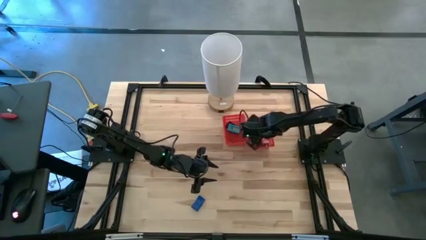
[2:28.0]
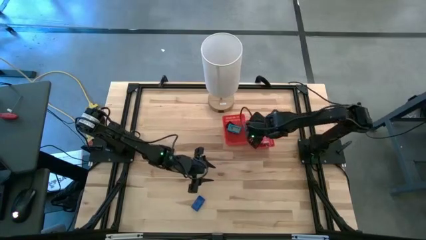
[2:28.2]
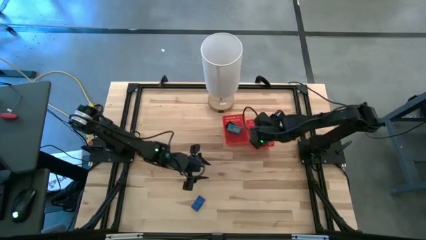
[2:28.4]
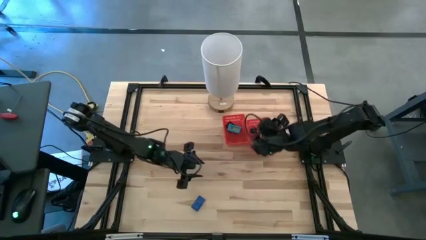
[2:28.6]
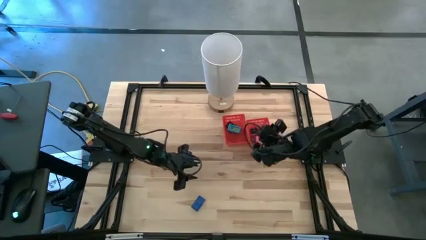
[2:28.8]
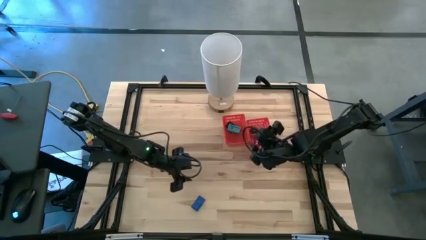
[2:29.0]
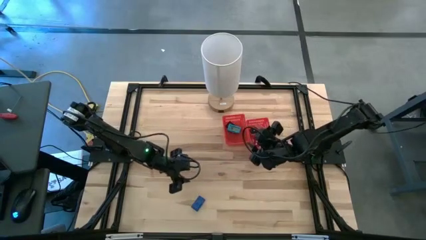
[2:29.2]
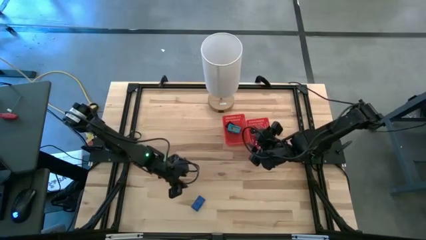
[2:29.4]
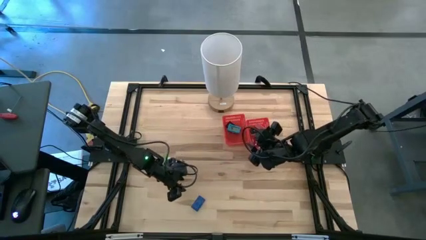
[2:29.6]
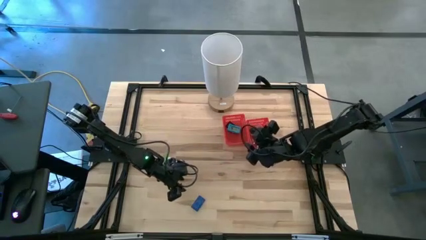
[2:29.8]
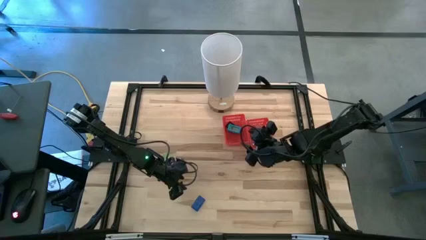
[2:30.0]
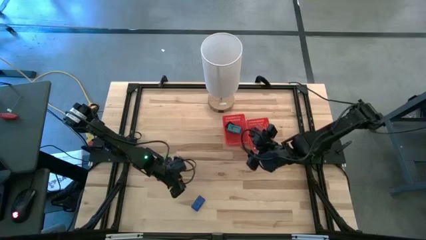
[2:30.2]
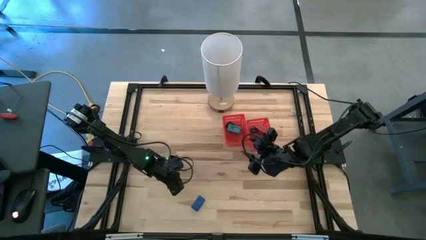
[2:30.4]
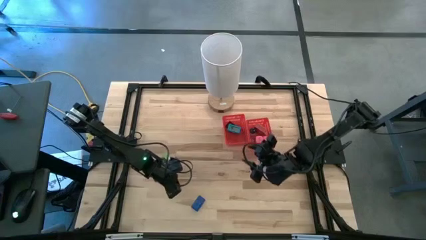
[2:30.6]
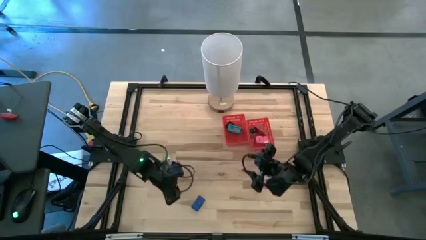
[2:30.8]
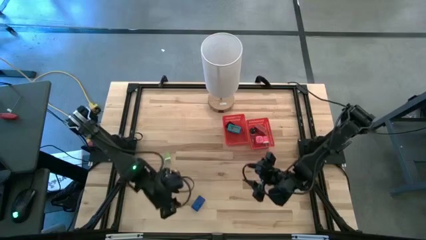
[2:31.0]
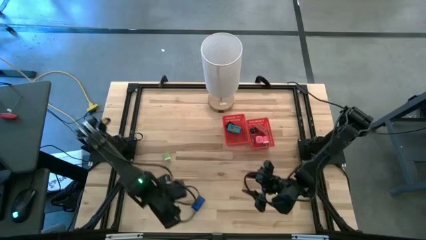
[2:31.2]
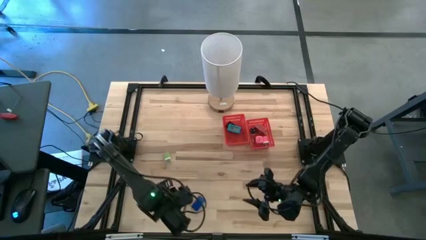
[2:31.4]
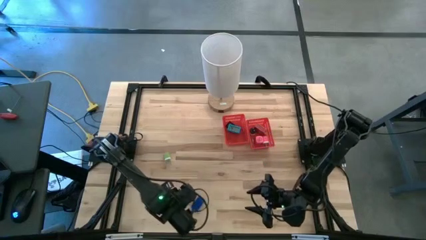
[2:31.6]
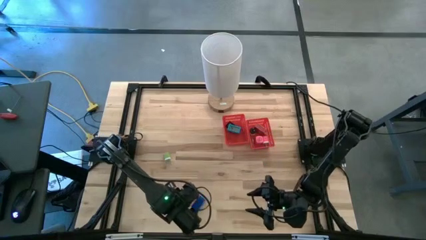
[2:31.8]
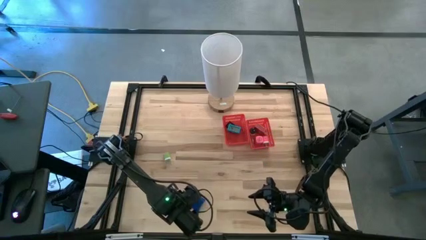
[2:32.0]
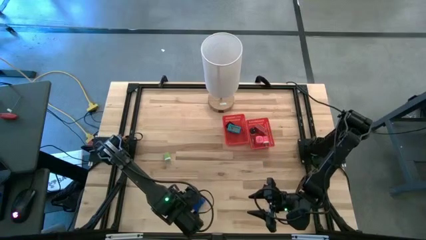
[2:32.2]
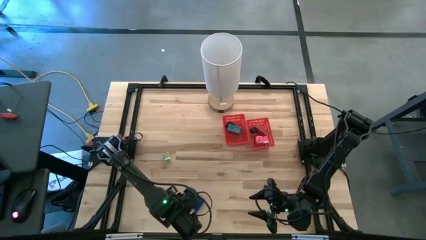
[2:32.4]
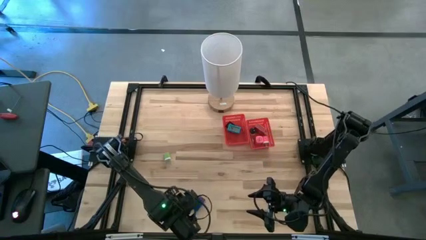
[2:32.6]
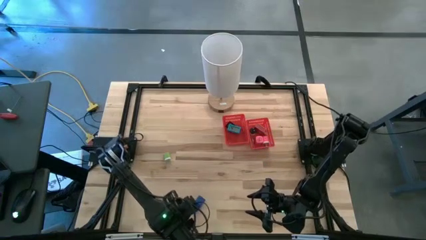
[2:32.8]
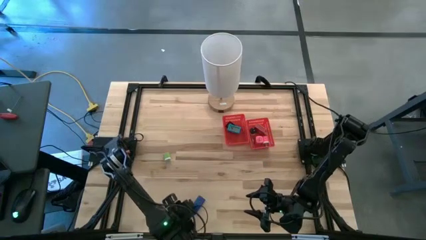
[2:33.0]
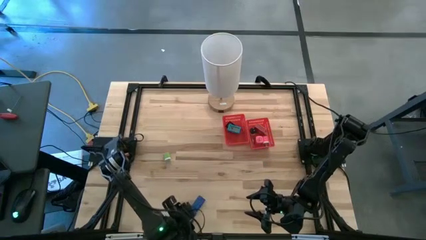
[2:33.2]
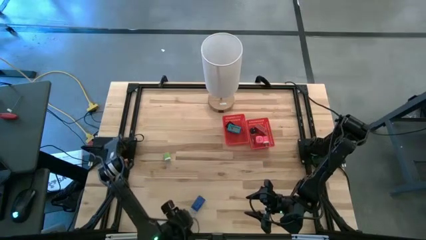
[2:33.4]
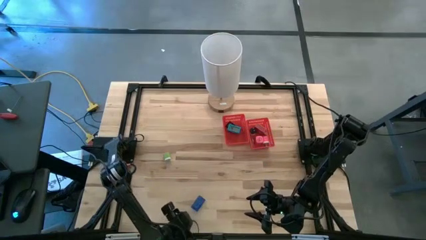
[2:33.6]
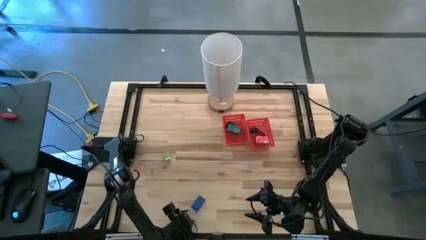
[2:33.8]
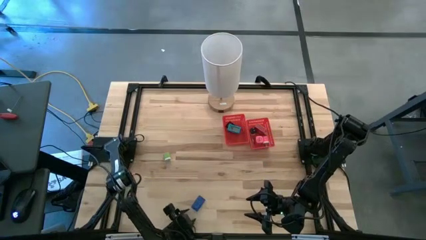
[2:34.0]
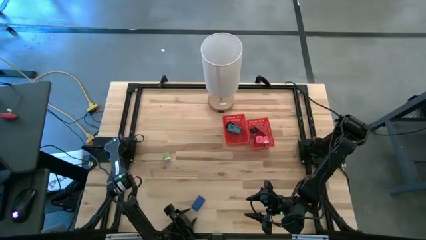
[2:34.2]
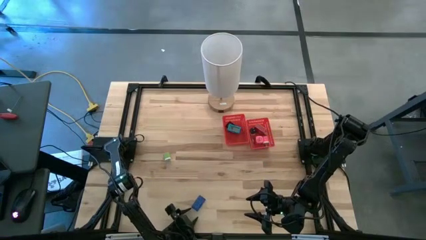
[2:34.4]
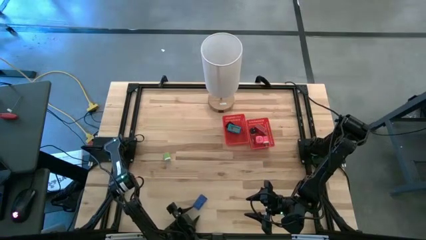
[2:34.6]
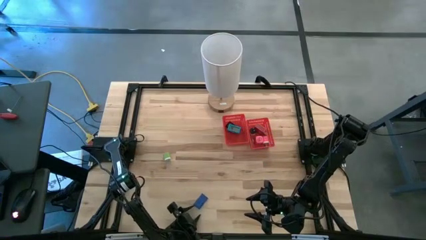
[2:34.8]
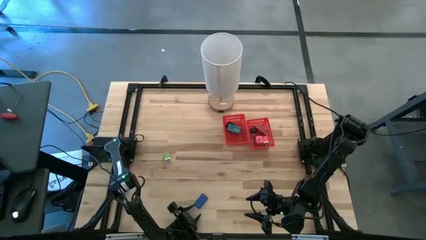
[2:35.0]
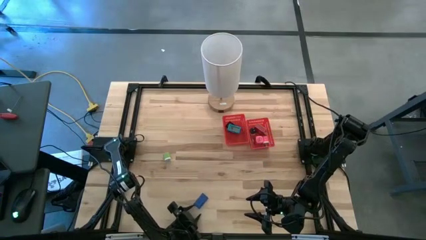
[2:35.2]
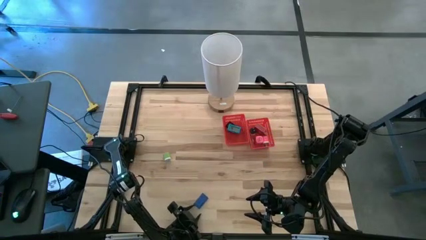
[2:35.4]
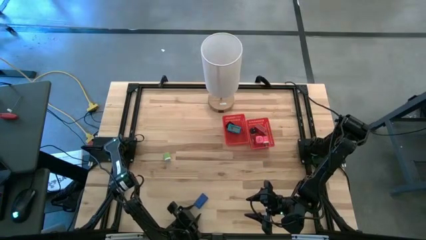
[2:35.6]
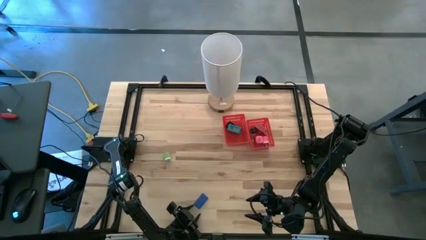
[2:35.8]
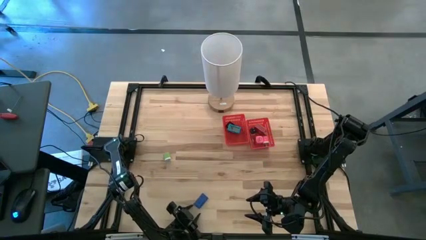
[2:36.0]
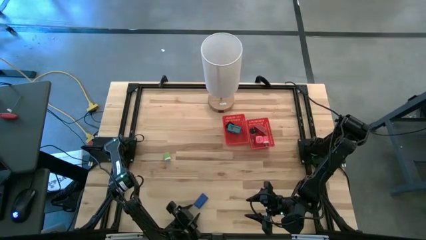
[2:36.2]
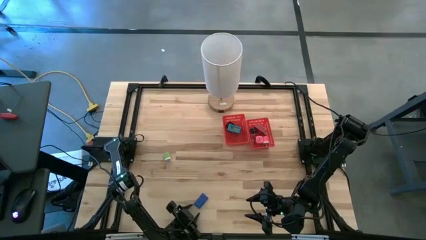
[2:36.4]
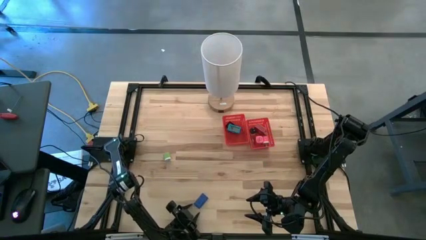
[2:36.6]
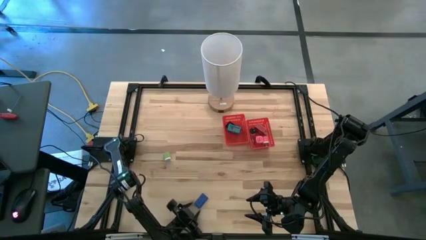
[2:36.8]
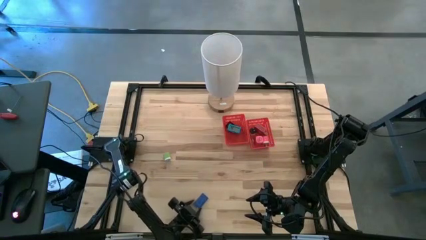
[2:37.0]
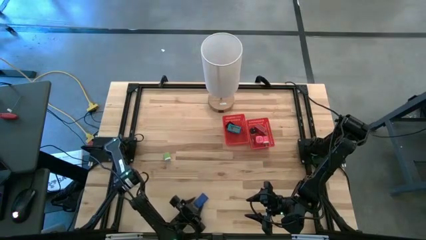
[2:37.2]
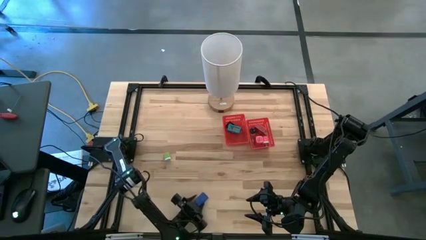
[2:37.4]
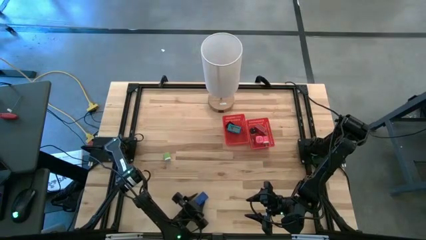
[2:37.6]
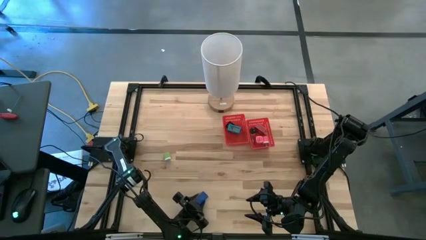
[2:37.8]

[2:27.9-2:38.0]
Task: Pick & Place Office items
Put the blue timer into the left red bin

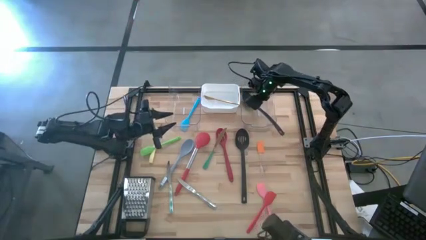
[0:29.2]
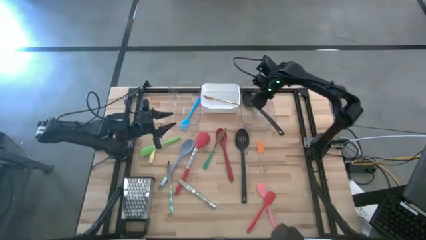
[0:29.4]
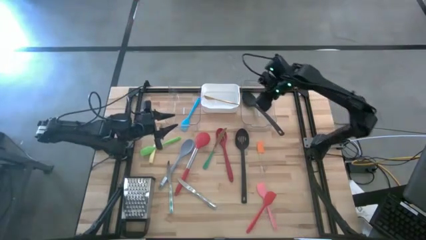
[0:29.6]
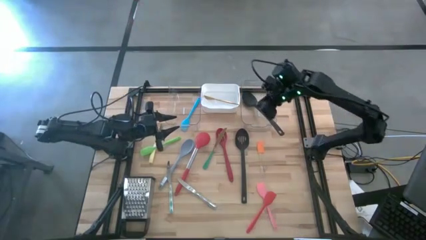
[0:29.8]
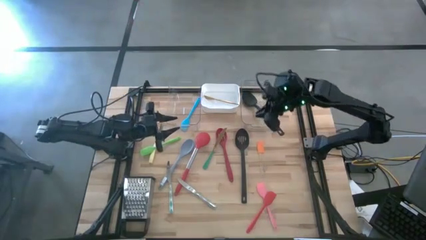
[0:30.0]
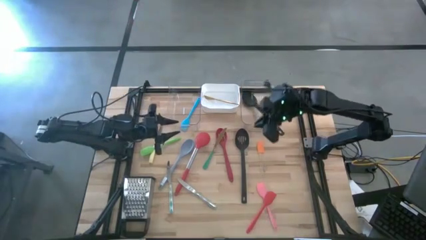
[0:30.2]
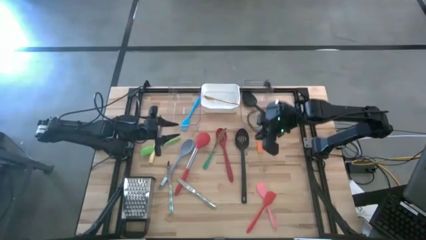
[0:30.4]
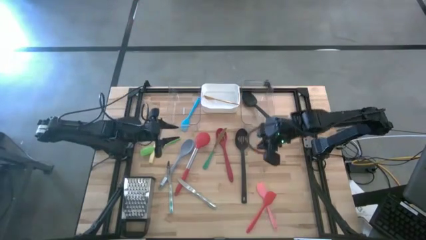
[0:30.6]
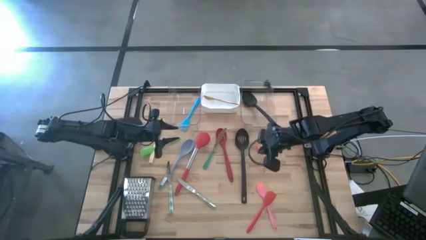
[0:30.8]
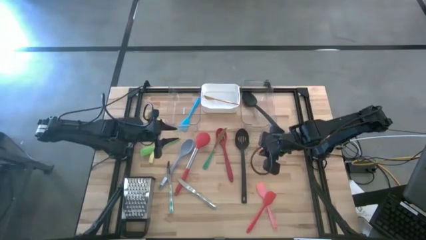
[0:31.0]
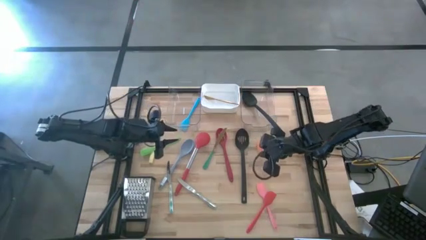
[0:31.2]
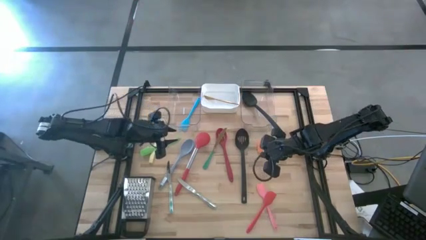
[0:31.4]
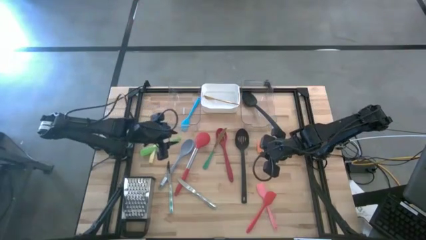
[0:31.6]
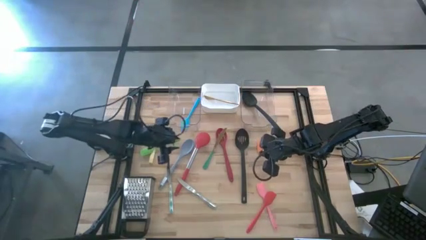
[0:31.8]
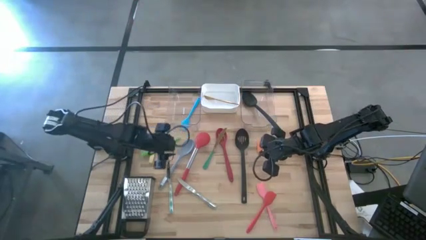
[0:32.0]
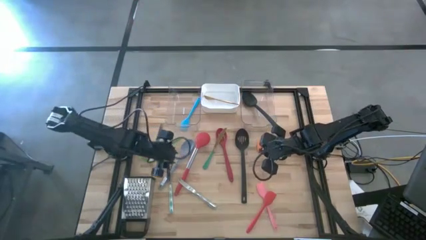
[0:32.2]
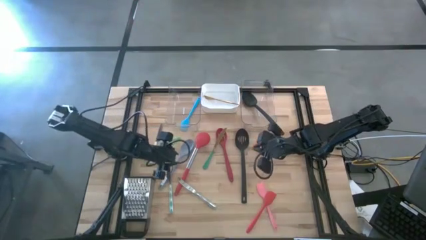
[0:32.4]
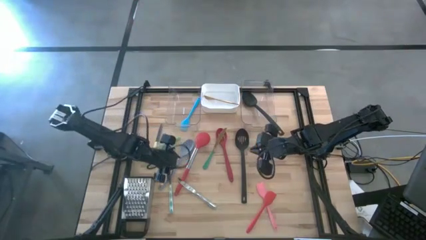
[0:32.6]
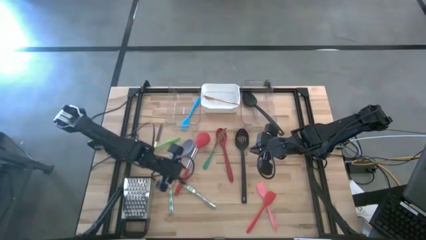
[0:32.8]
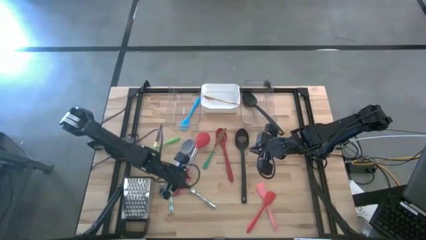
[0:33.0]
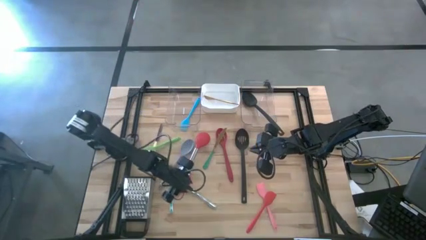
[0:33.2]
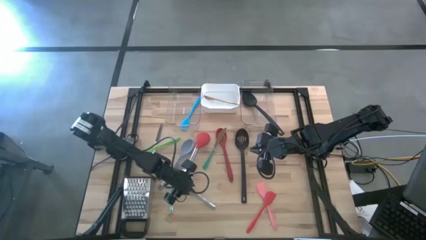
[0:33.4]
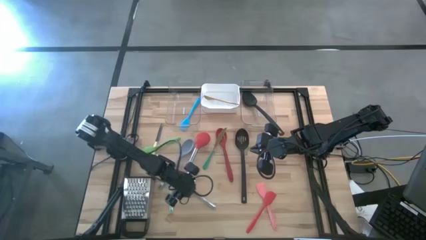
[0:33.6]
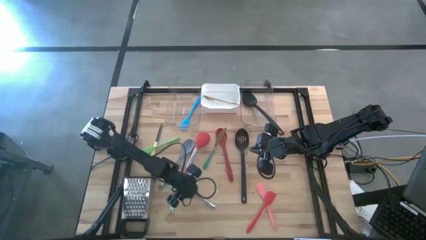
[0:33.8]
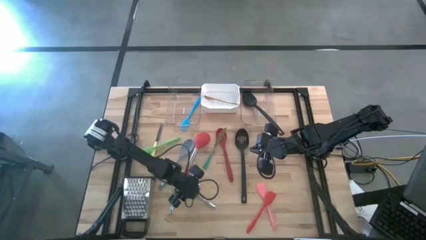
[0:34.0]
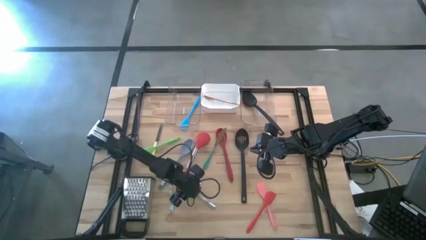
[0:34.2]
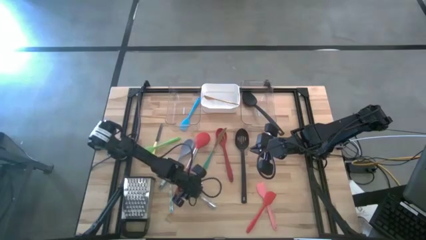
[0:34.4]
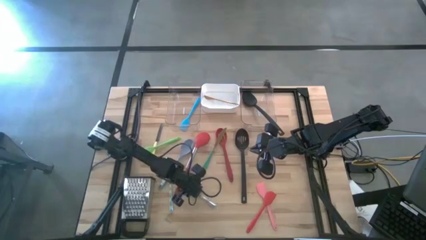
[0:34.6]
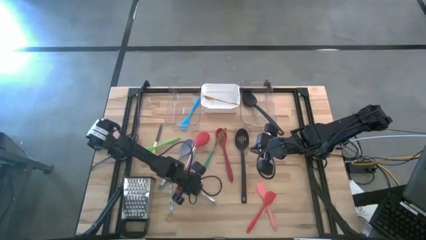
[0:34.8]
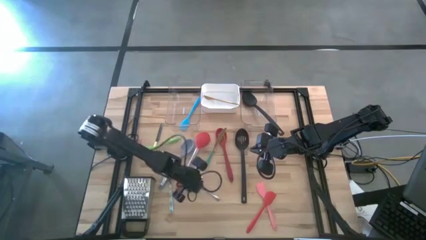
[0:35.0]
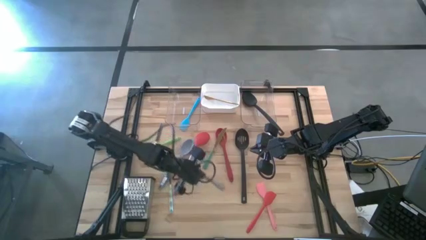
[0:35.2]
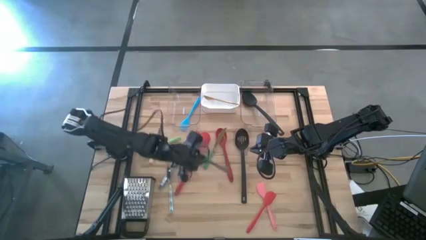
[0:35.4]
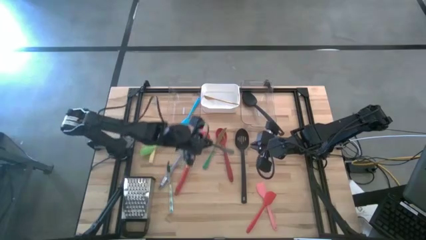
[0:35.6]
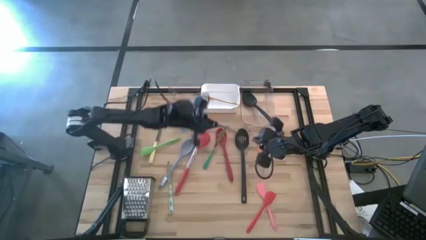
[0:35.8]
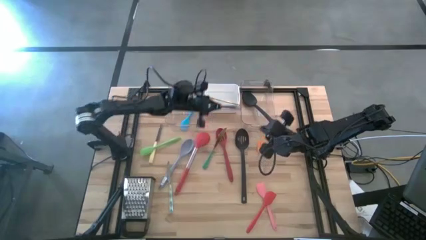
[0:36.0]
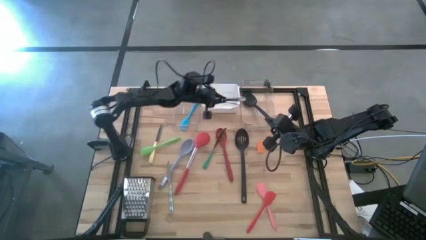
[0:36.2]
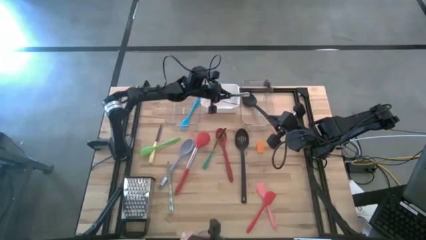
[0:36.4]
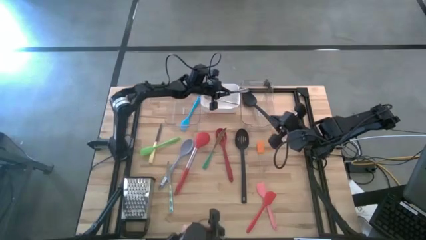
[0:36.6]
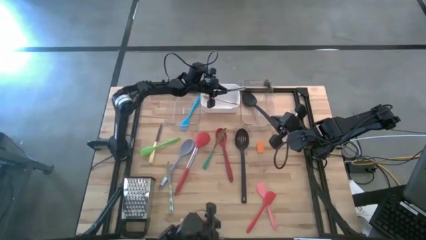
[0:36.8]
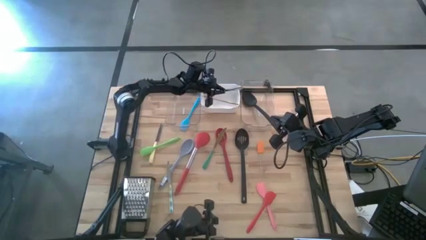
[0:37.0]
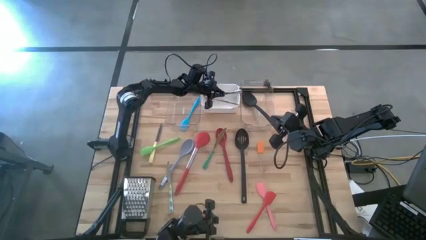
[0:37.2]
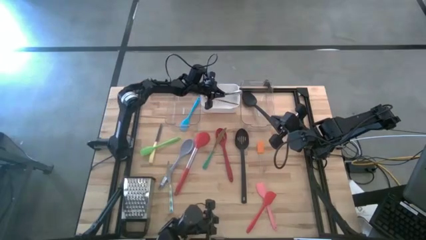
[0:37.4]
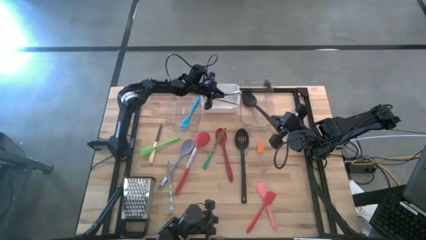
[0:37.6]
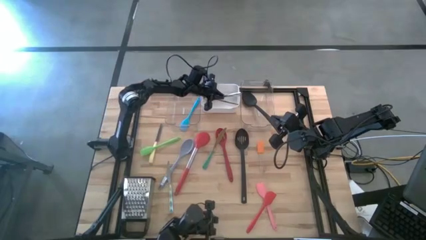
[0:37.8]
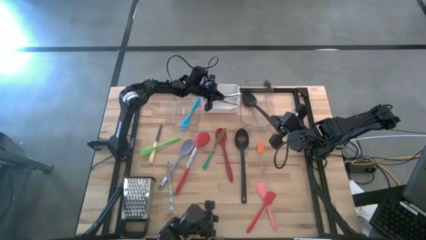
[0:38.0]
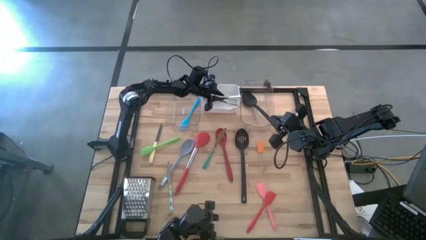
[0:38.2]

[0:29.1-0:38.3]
Task: Pick & Place Kitchen Items
Put the silver knife into the white bin
